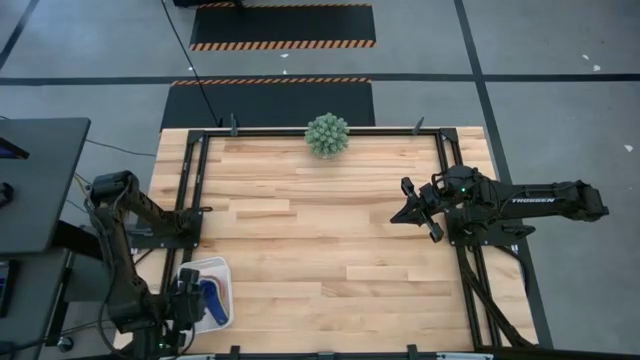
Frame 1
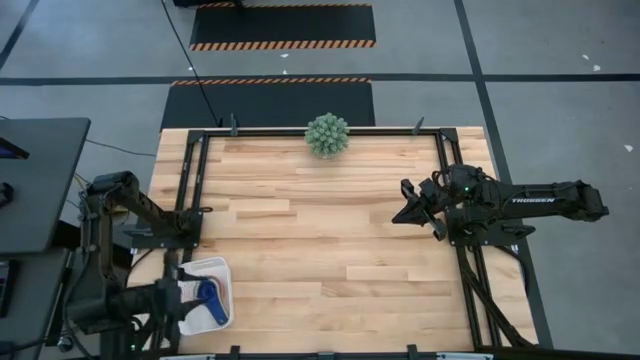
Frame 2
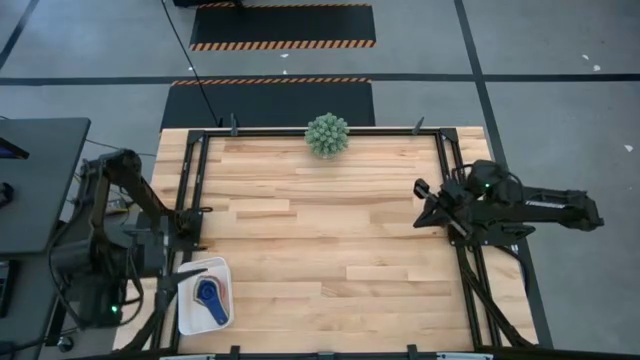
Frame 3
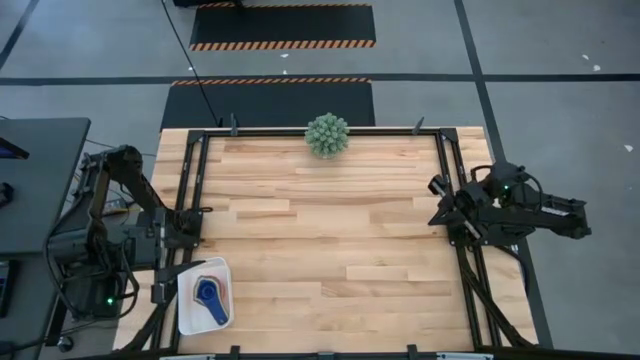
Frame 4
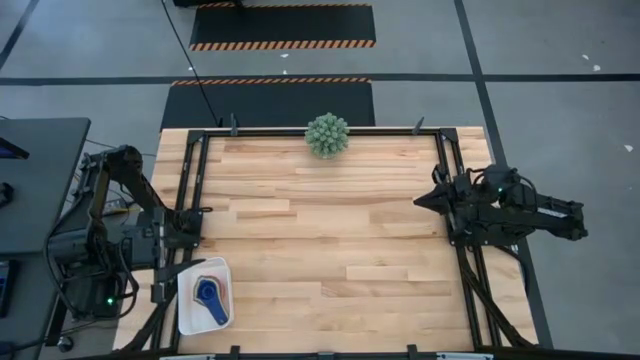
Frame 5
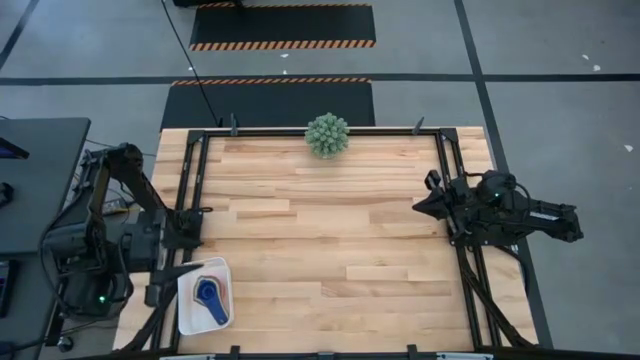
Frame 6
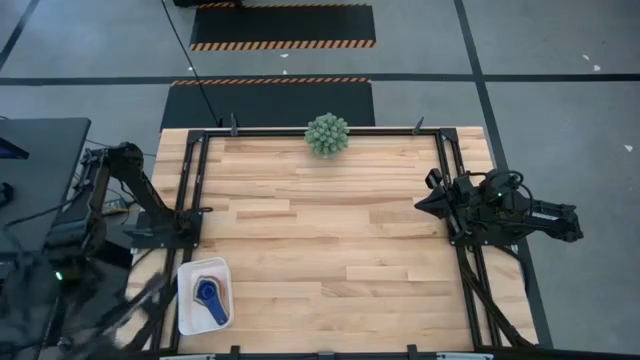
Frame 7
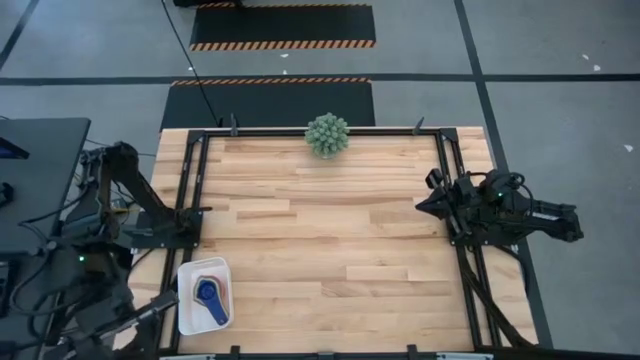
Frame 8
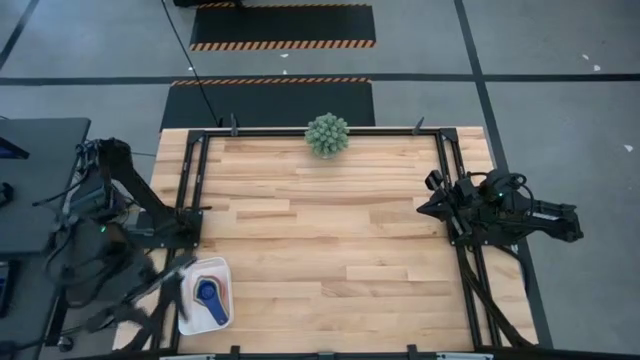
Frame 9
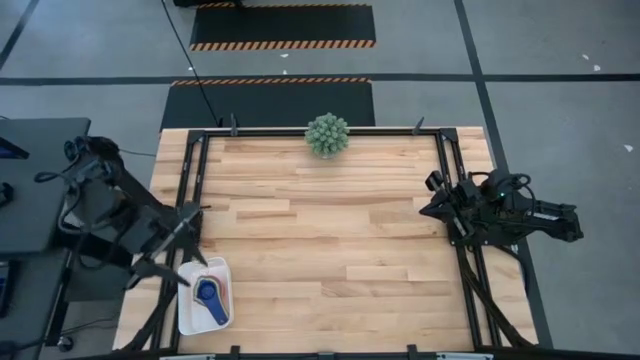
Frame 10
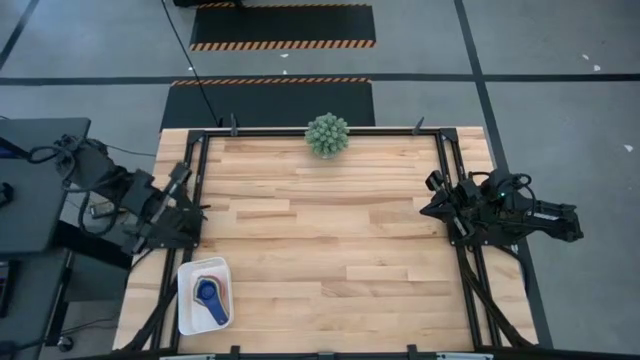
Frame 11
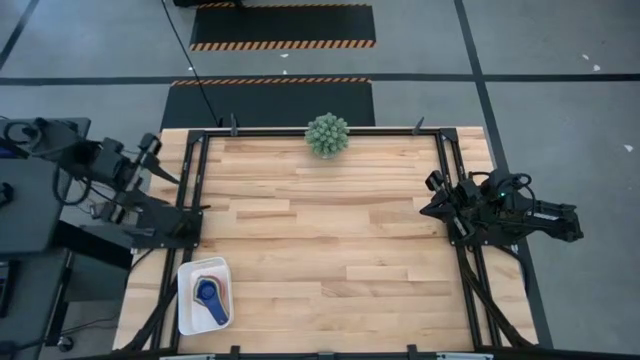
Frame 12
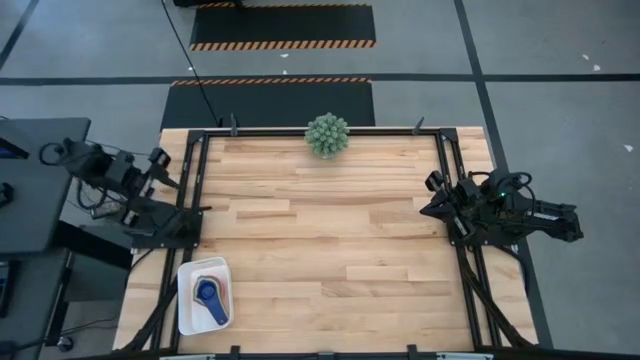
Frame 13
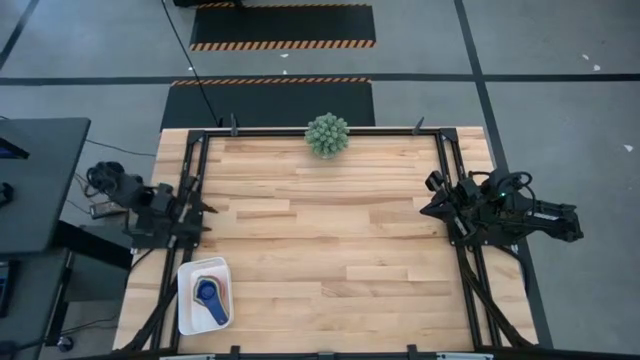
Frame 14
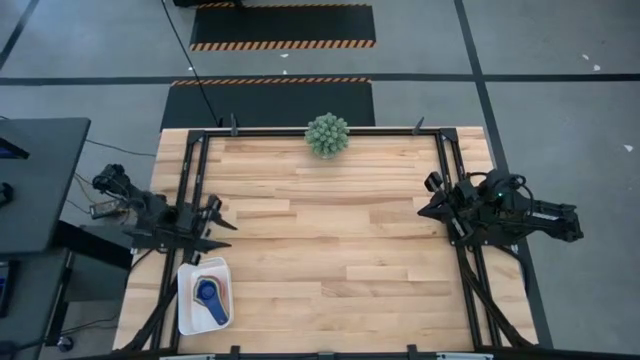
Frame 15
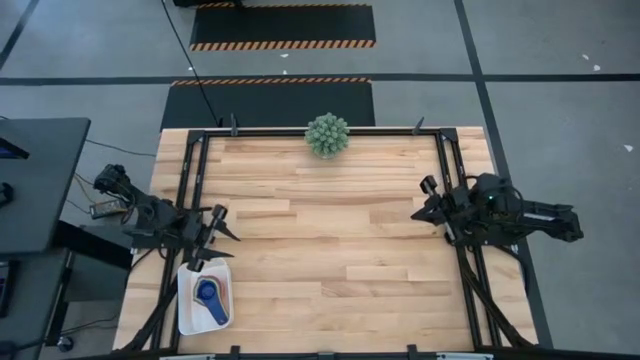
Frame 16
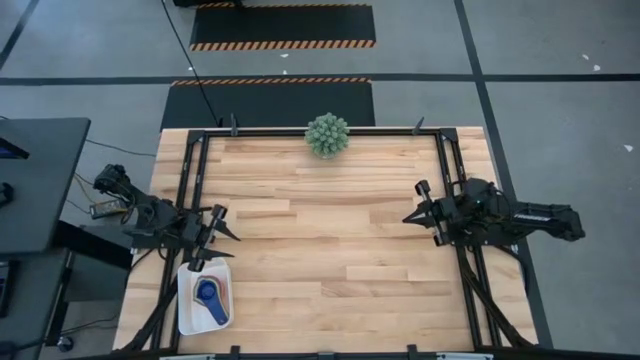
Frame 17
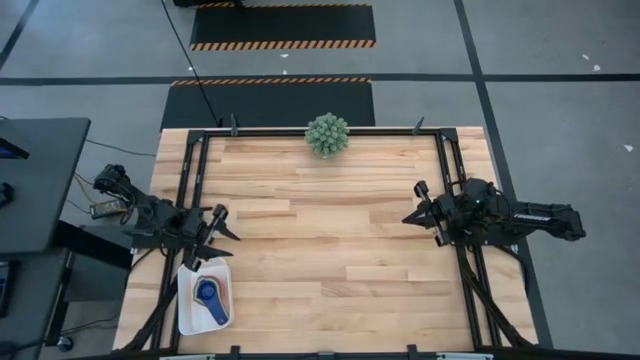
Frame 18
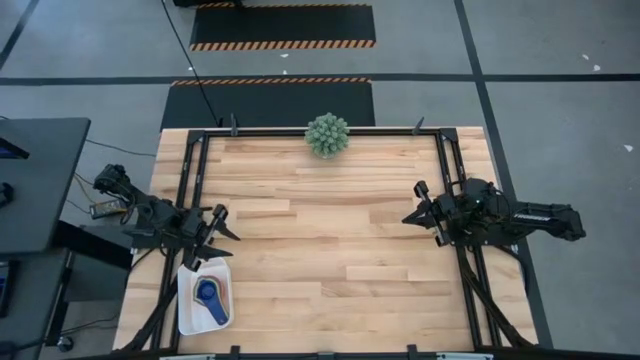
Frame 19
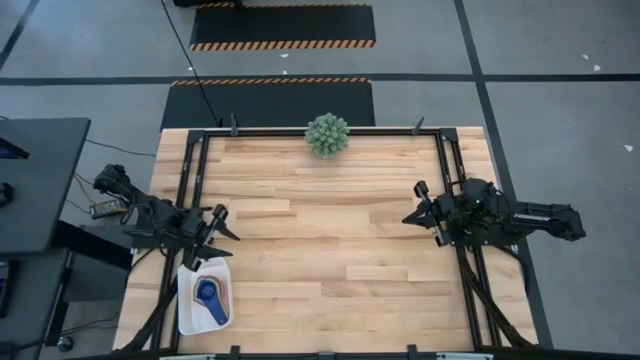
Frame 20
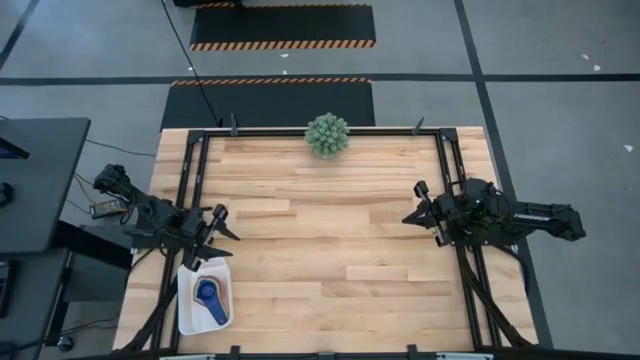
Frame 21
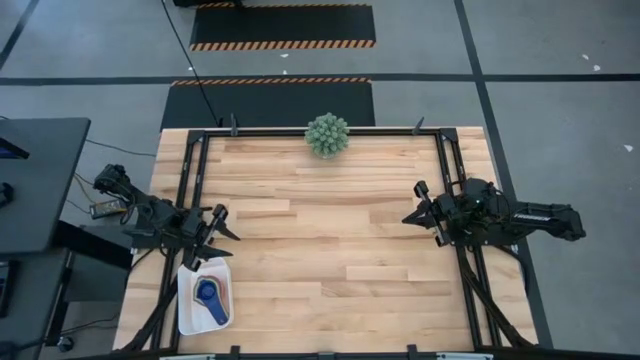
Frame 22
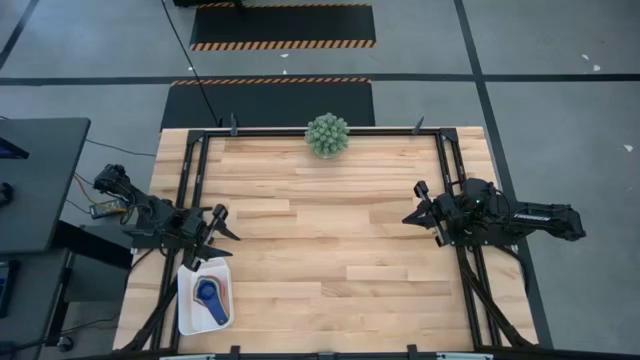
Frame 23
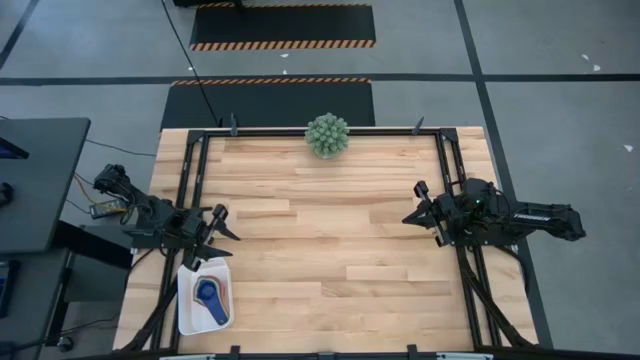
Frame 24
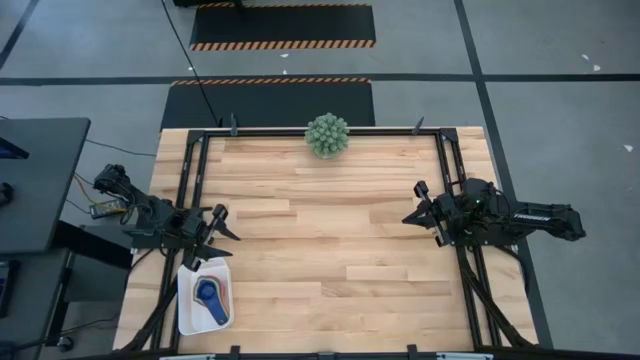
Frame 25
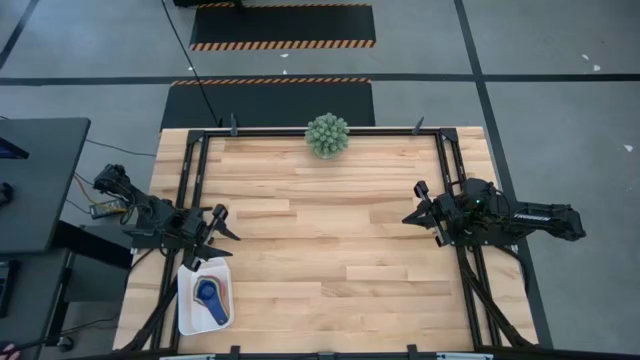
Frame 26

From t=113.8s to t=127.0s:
Task: Nest measuring cups in basket
Return to Home Position

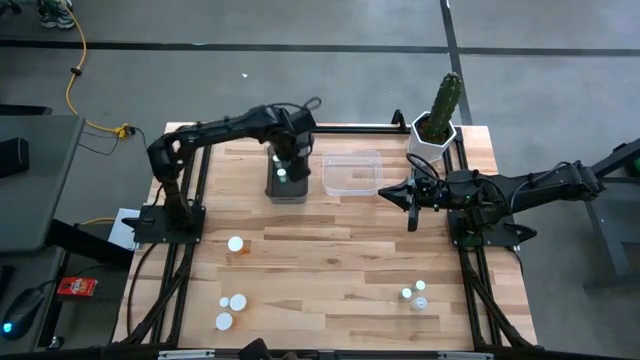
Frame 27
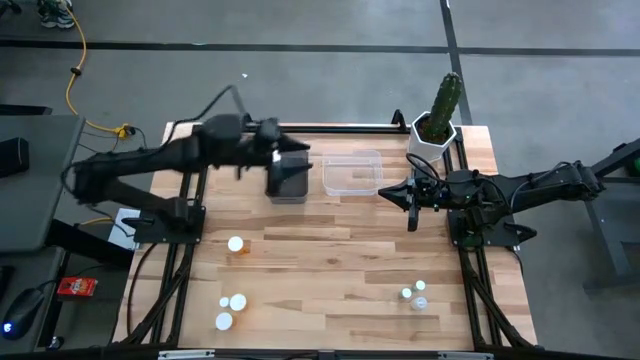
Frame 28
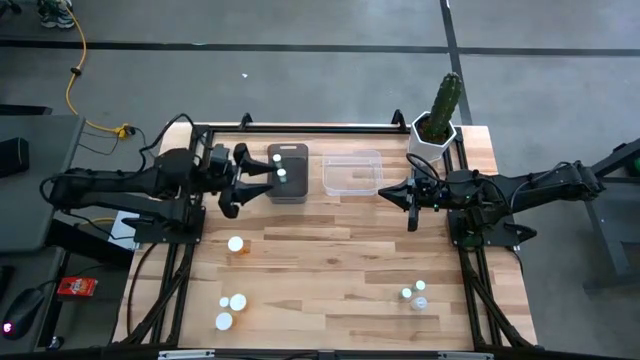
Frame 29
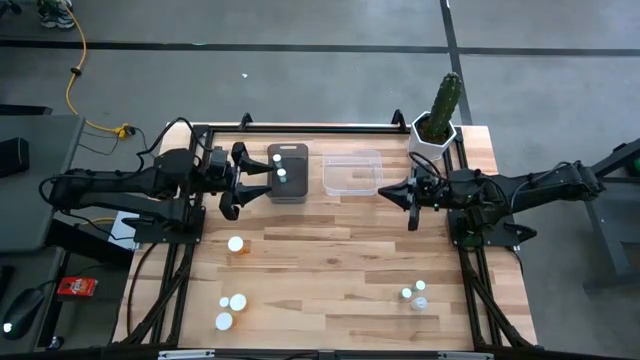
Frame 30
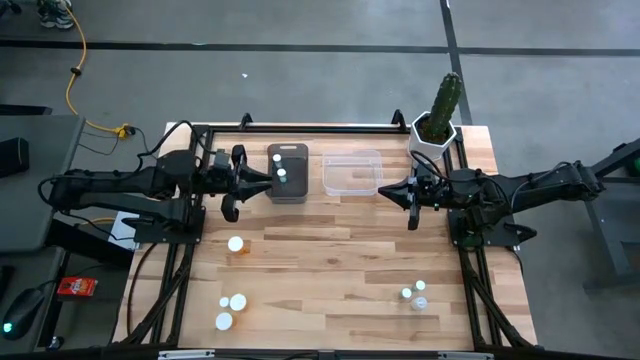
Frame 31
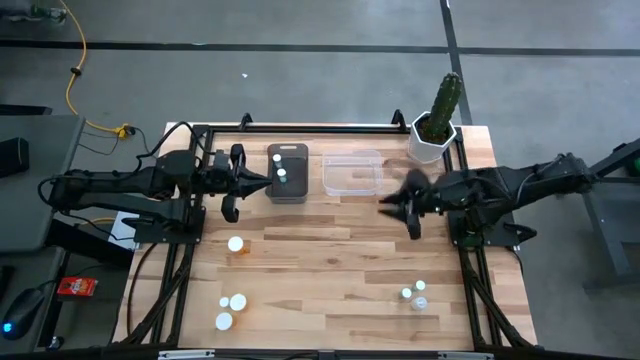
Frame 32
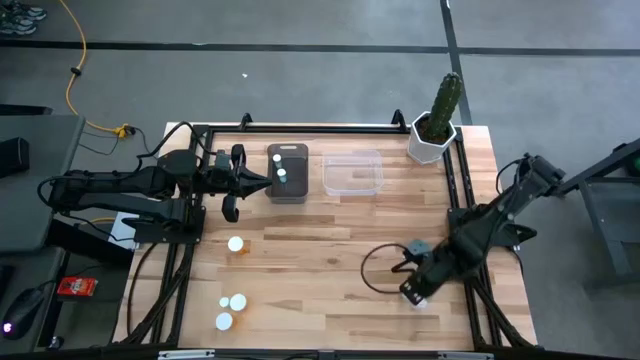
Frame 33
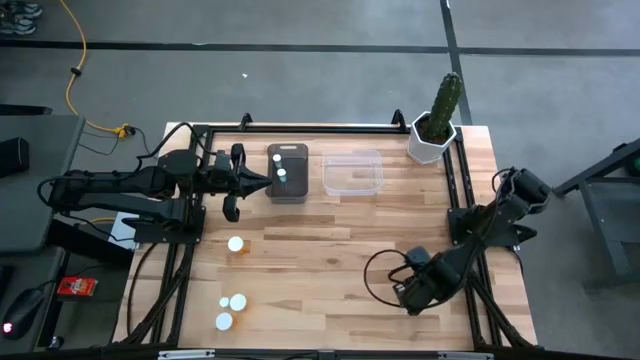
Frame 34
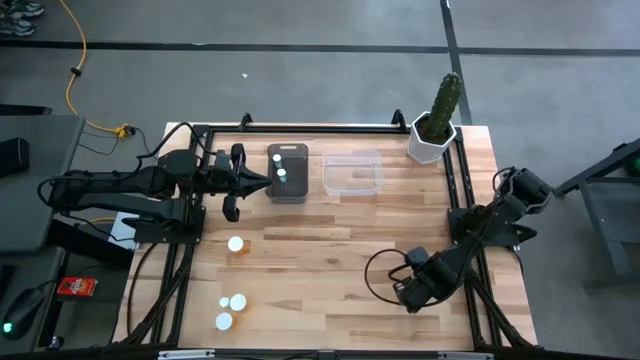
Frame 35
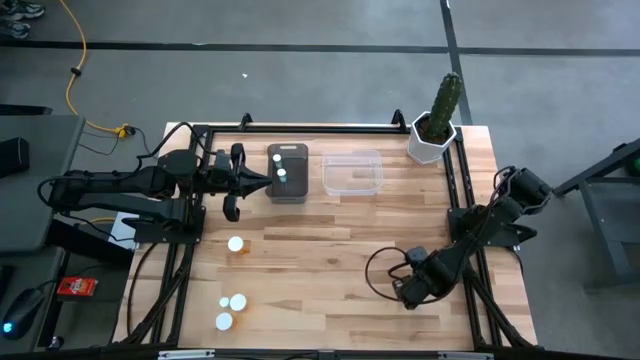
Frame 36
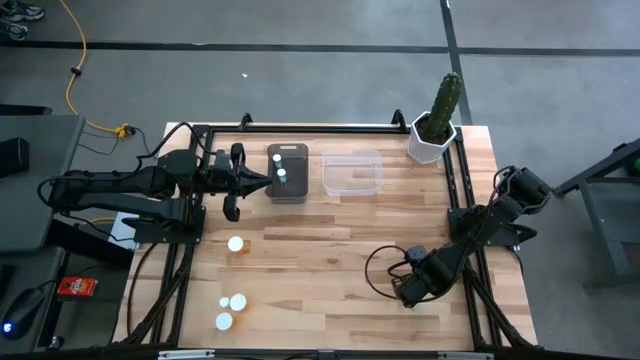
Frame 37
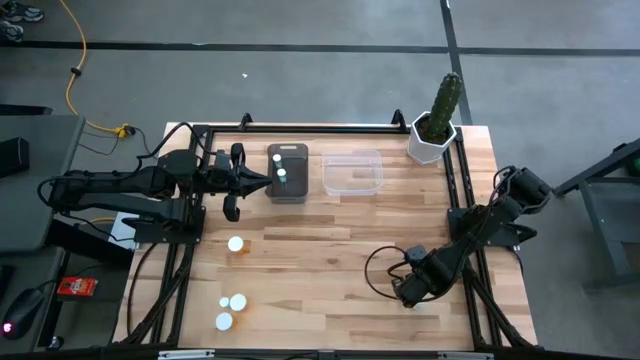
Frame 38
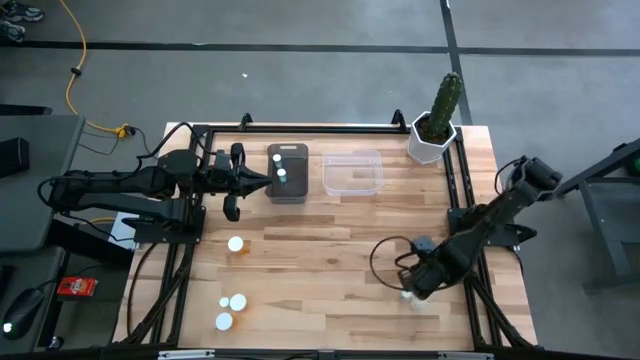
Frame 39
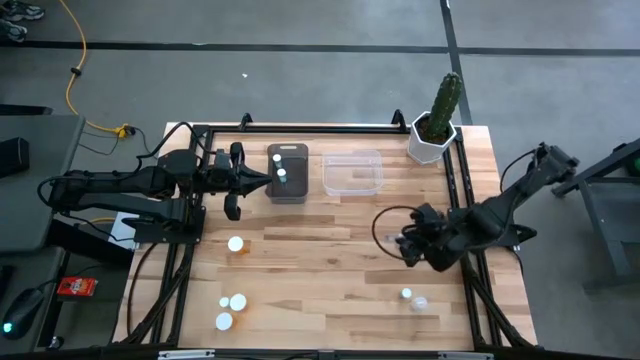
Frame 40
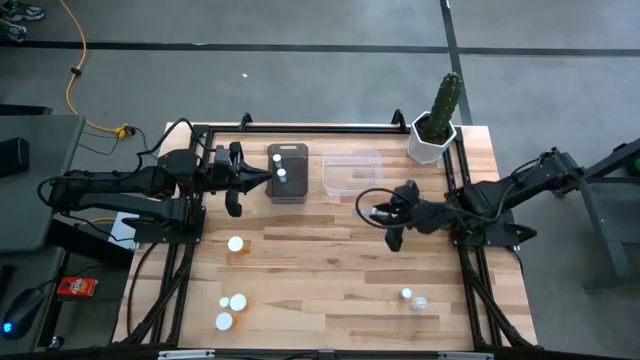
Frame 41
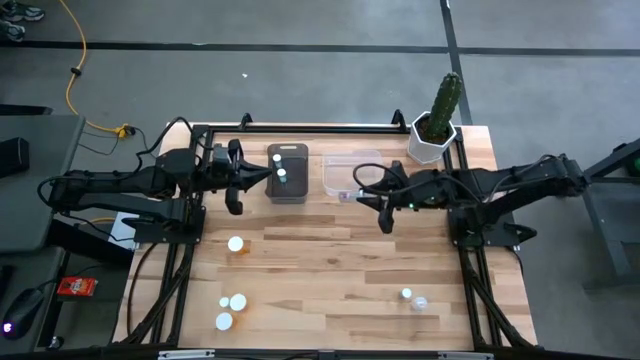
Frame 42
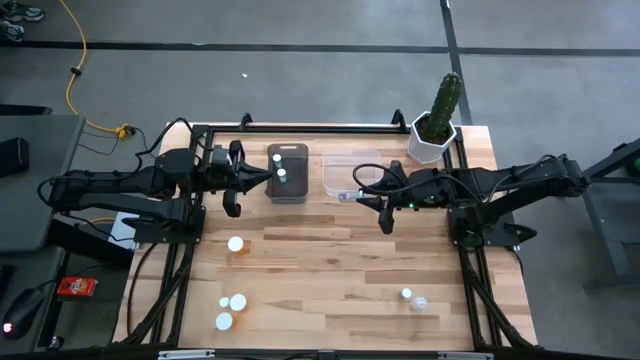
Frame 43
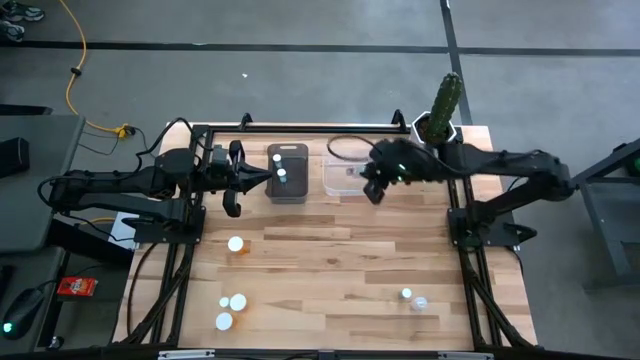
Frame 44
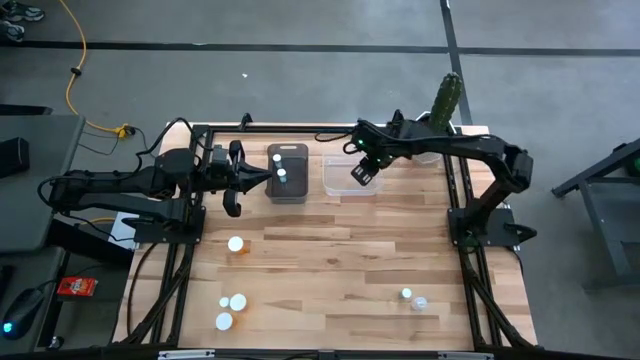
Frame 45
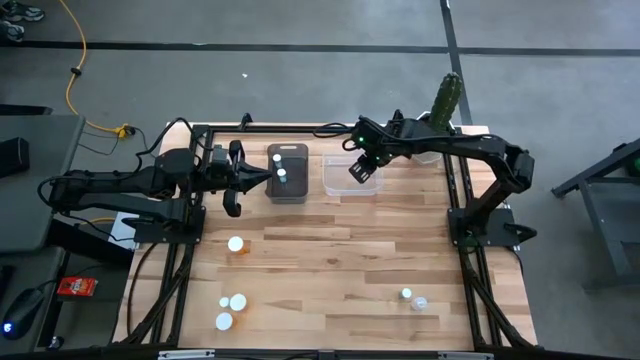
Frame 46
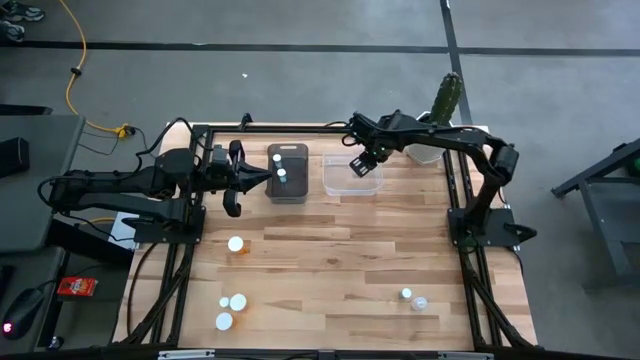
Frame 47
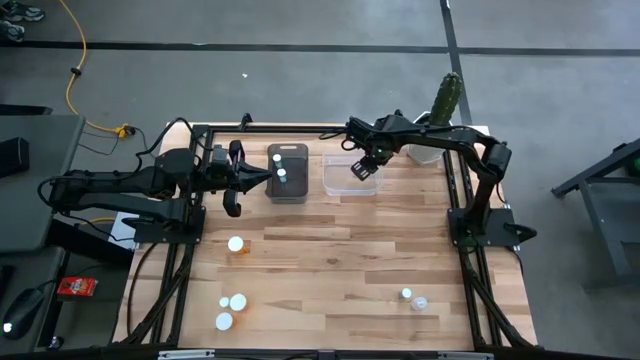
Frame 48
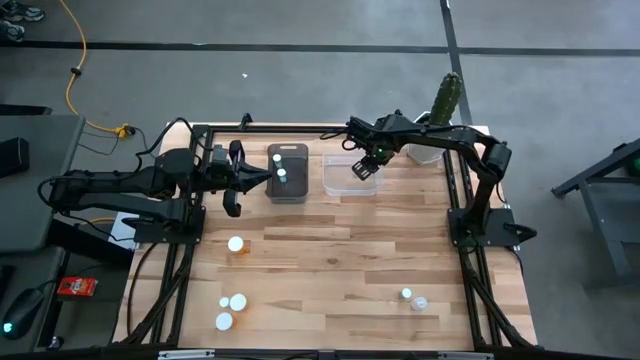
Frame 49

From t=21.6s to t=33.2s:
Task: Pick and place medicine bottles into bin by pill shape (circle, oval)
Put the blue capsule bottle into the transparent bin
